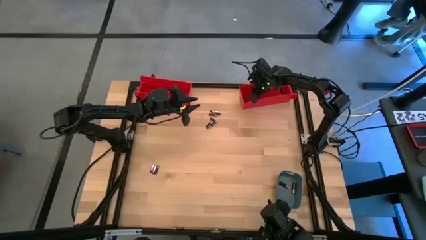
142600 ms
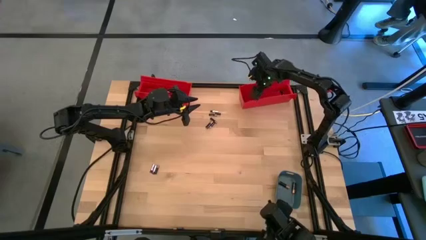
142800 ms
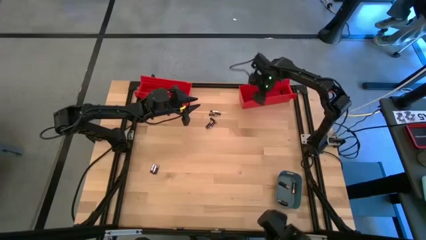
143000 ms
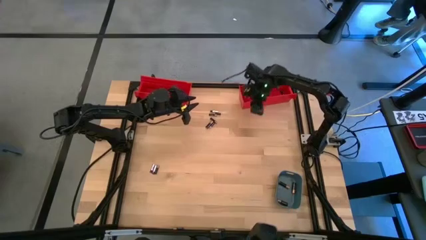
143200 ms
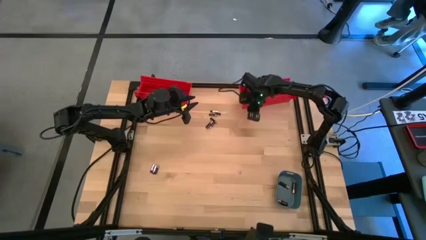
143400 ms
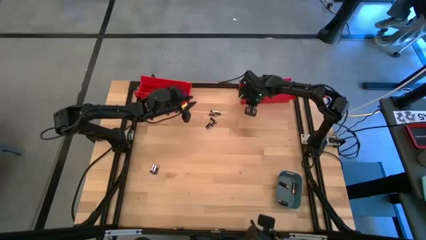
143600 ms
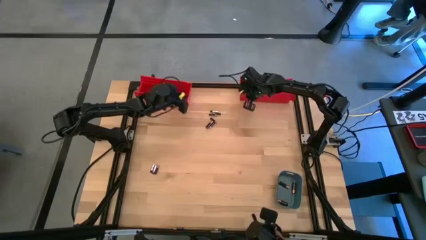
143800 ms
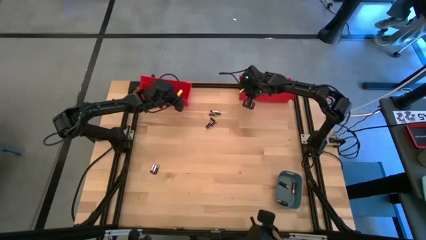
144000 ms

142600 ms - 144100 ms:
Task: Sort batteries
Adjust the right red bin

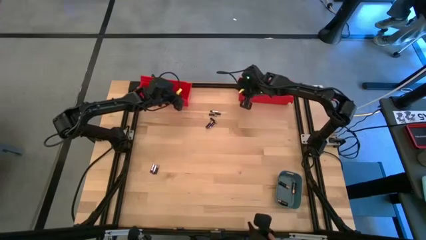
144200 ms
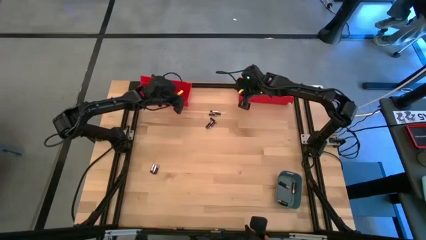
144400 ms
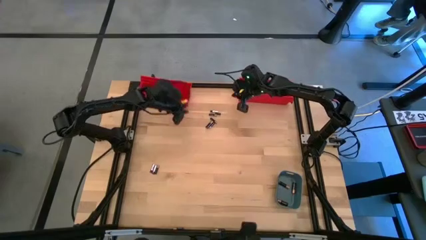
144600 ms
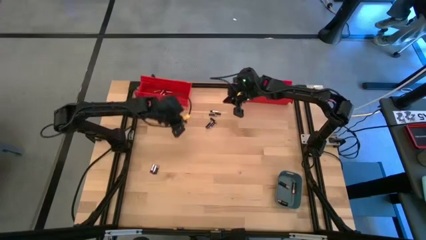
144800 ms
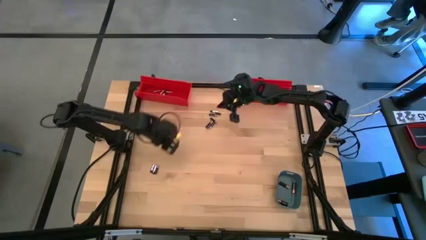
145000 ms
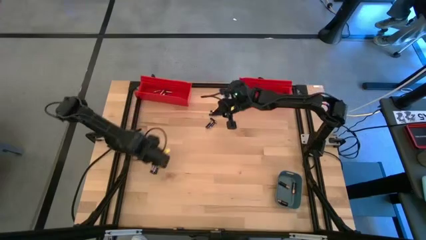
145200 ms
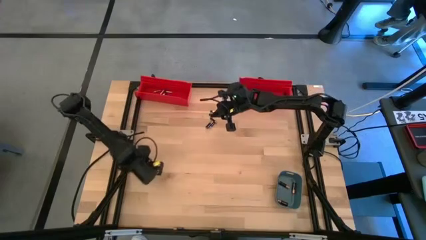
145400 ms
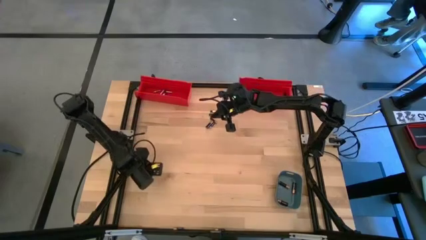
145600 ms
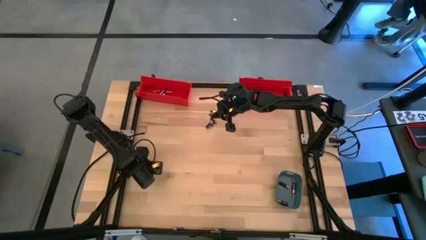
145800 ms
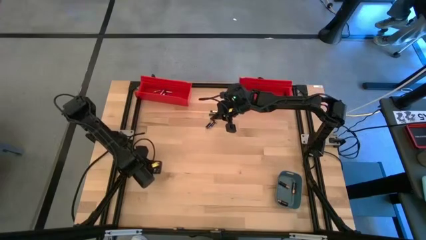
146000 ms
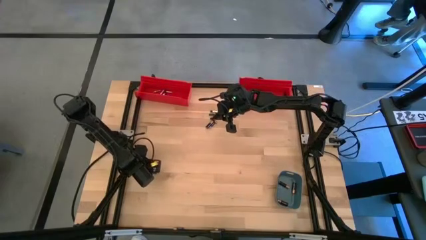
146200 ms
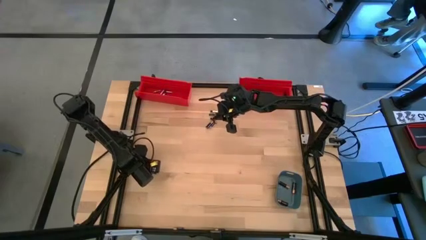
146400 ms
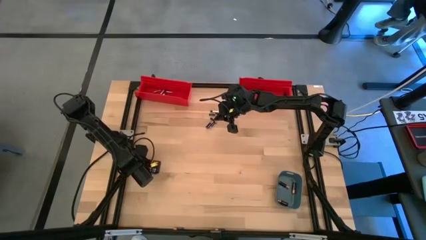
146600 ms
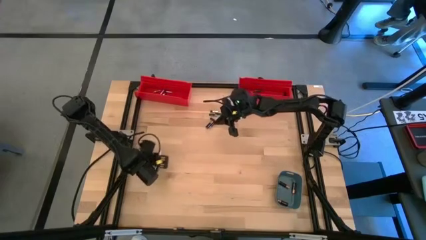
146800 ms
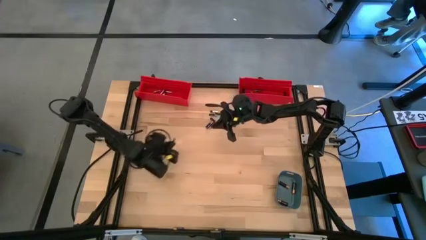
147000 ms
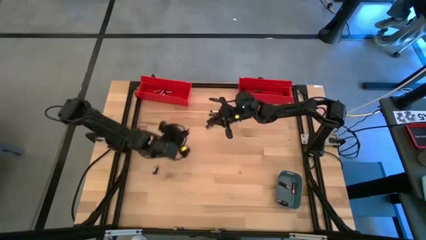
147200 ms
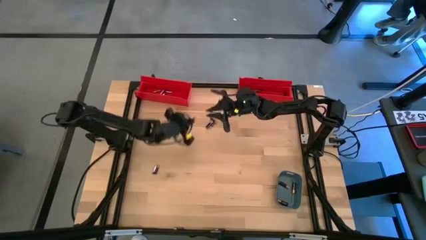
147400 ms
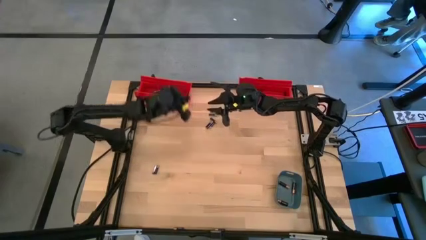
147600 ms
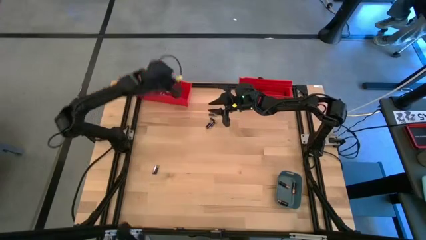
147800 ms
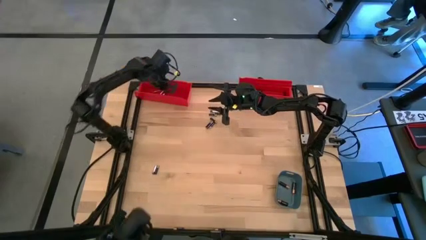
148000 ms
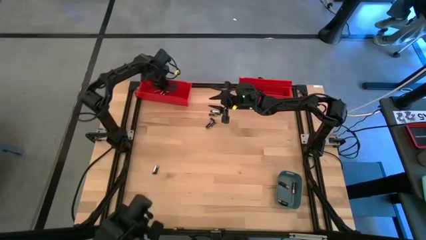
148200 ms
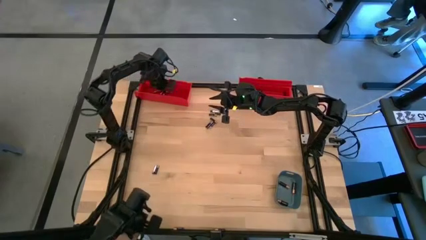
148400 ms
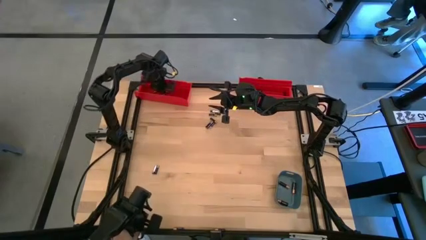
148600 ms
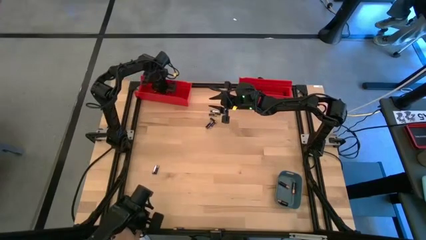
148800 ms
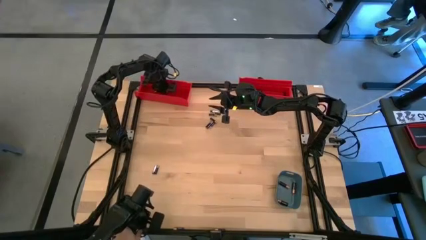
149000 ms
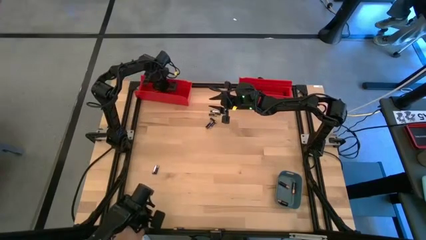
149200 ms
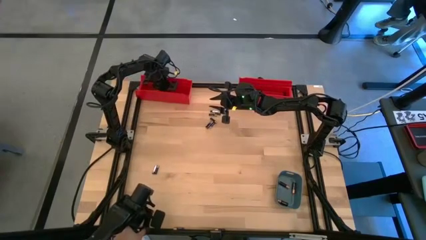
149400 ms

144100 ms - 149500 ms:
Put the small silver battery into the left red bin

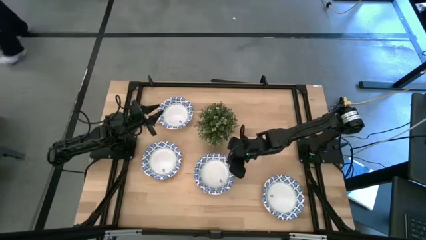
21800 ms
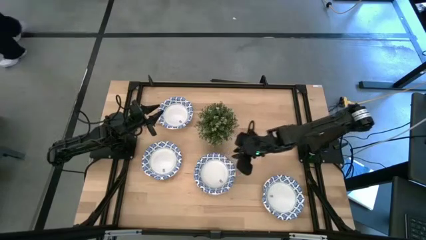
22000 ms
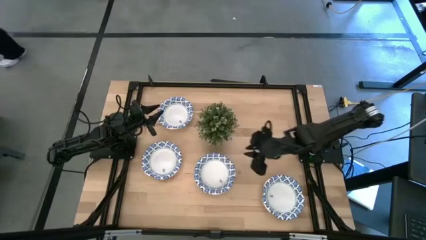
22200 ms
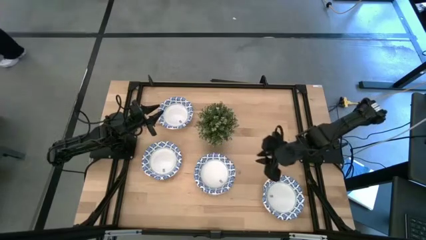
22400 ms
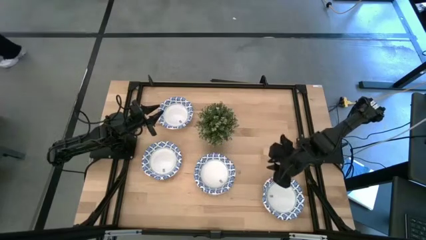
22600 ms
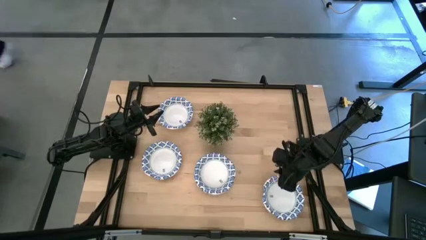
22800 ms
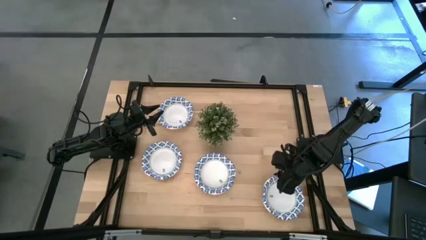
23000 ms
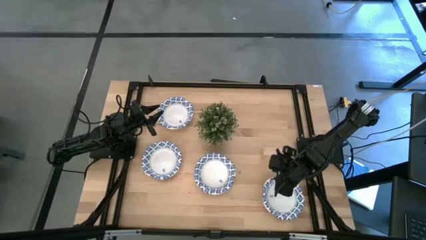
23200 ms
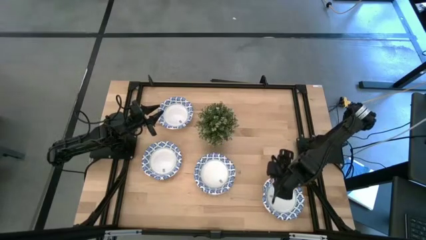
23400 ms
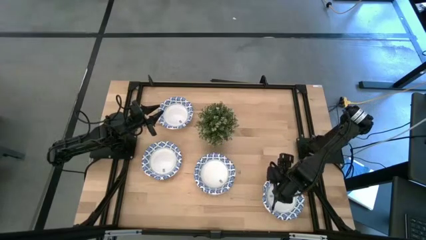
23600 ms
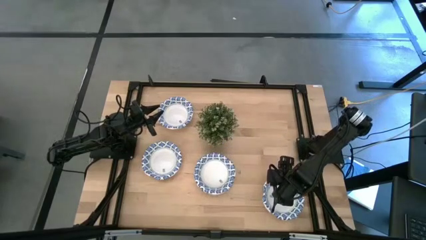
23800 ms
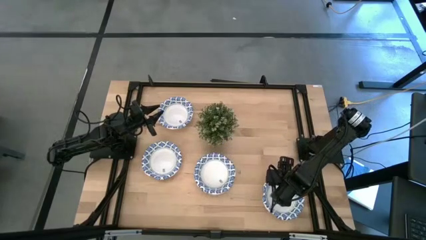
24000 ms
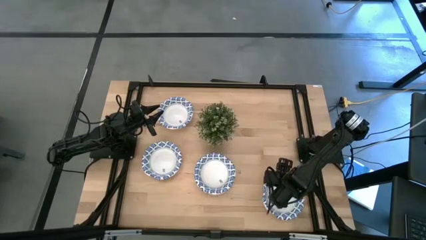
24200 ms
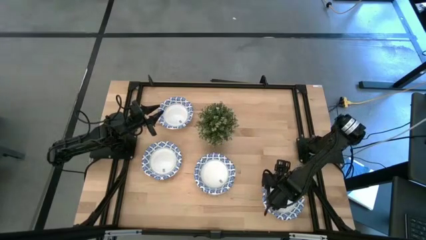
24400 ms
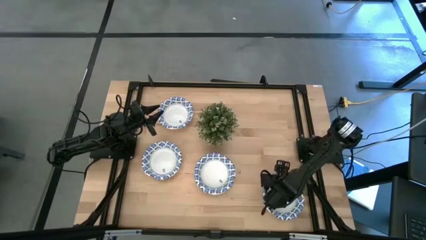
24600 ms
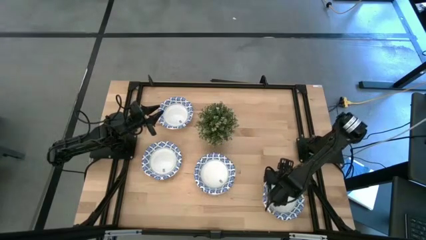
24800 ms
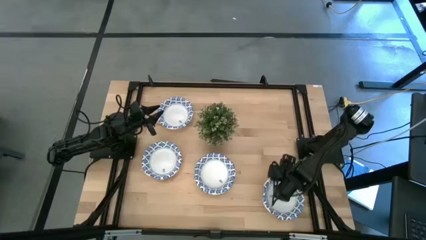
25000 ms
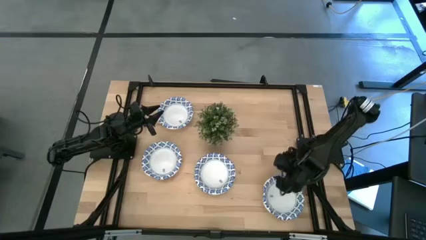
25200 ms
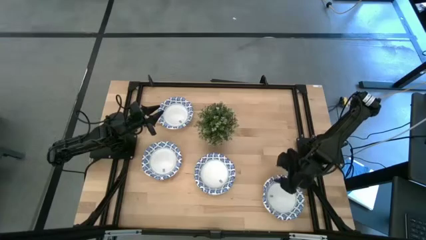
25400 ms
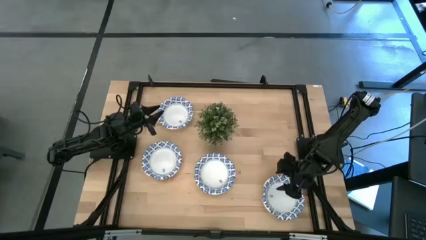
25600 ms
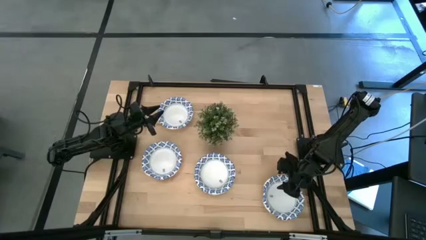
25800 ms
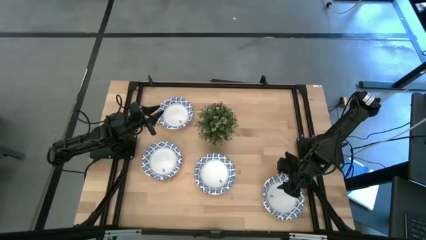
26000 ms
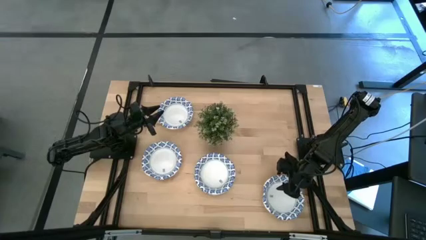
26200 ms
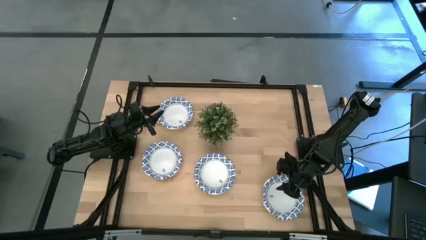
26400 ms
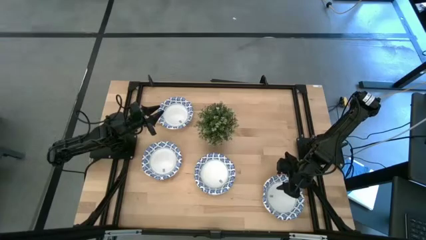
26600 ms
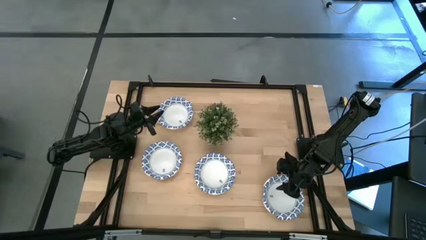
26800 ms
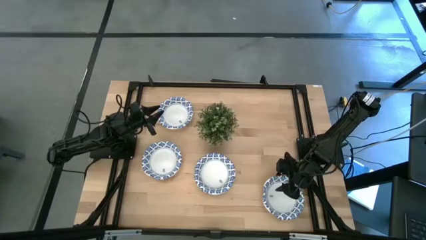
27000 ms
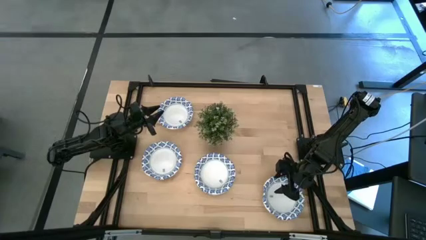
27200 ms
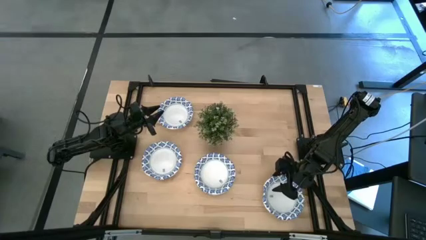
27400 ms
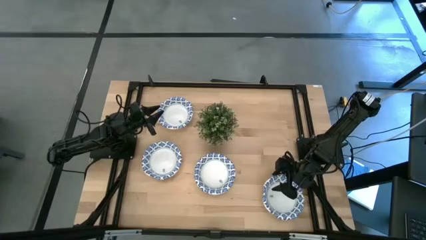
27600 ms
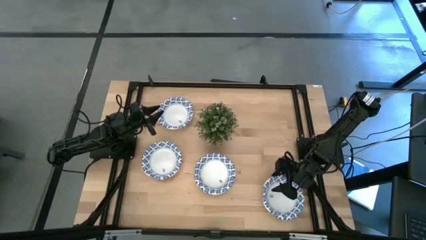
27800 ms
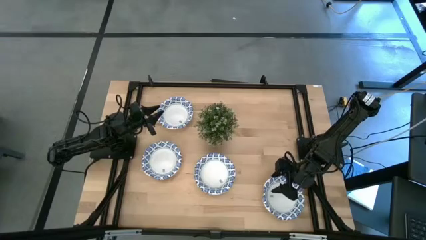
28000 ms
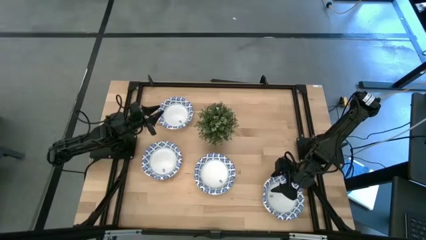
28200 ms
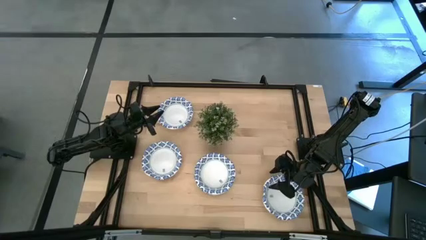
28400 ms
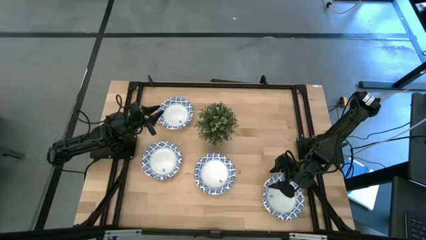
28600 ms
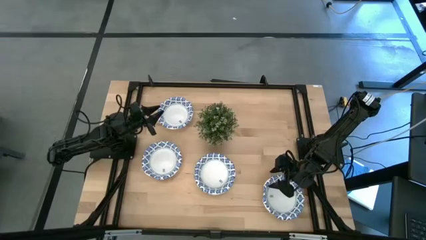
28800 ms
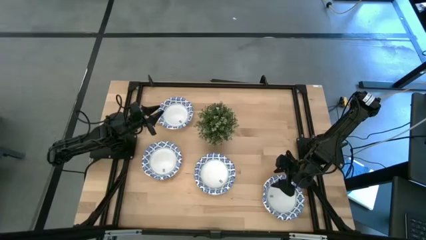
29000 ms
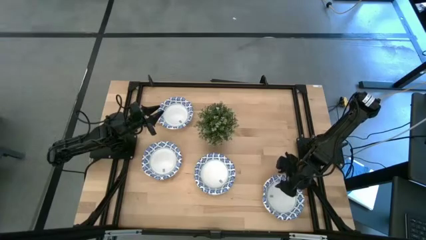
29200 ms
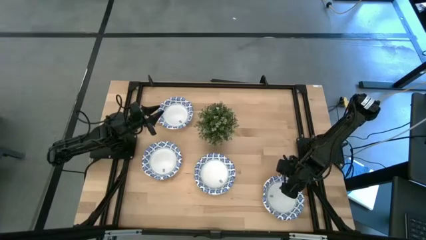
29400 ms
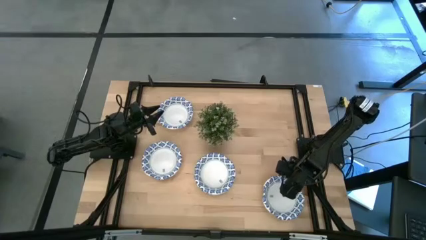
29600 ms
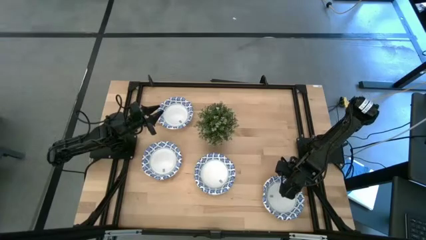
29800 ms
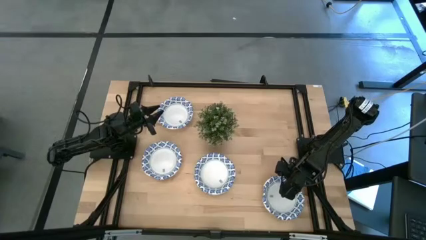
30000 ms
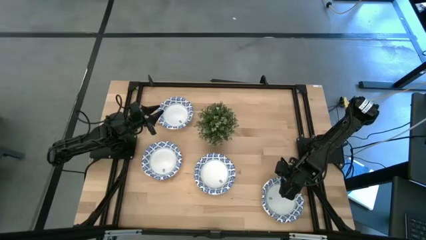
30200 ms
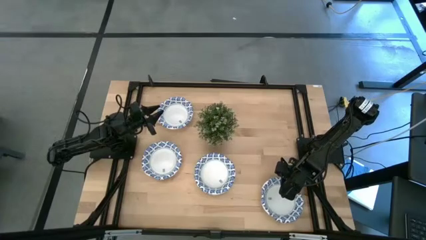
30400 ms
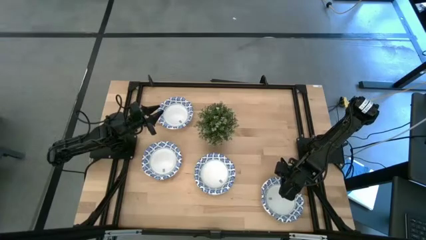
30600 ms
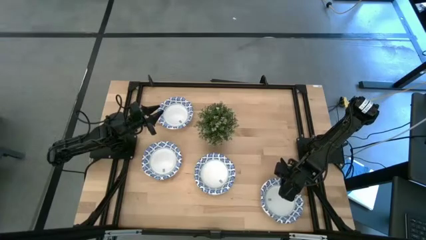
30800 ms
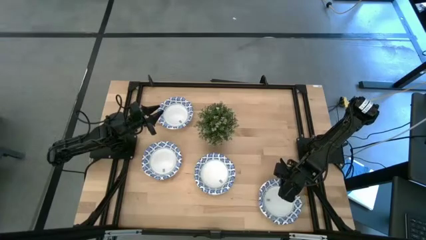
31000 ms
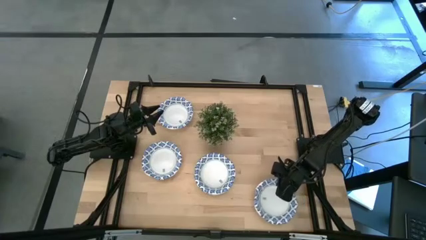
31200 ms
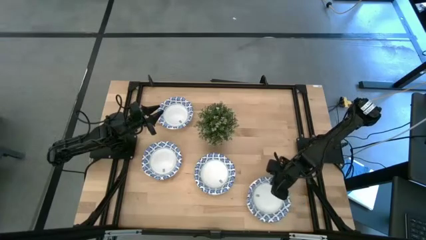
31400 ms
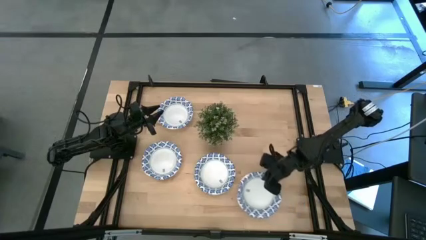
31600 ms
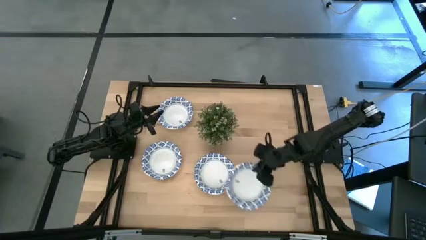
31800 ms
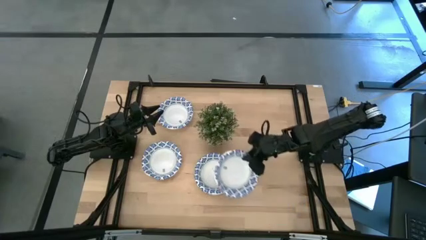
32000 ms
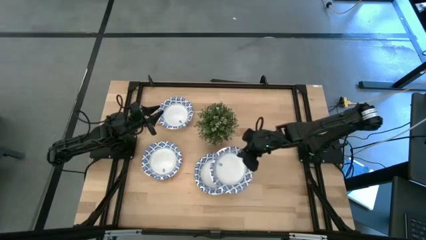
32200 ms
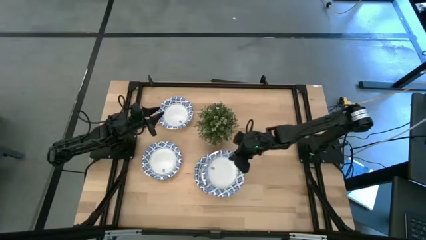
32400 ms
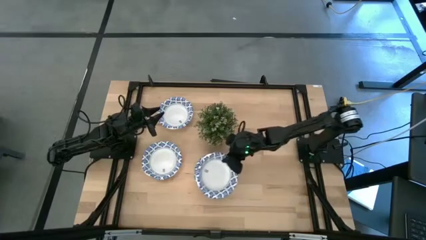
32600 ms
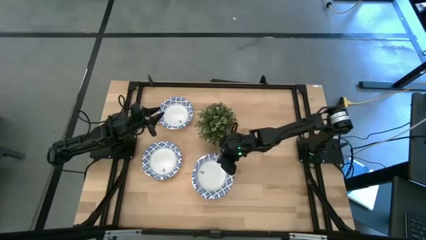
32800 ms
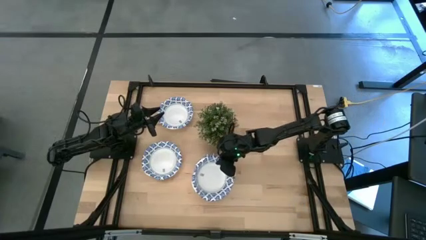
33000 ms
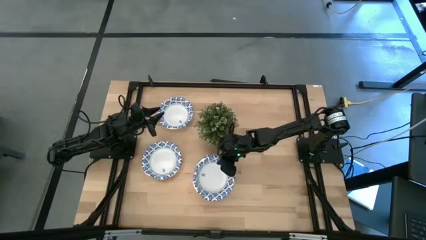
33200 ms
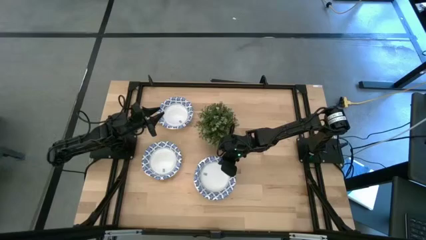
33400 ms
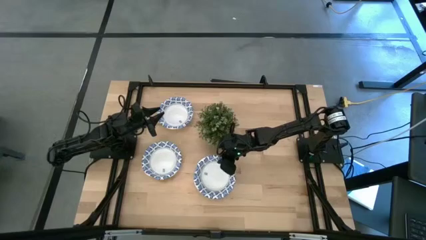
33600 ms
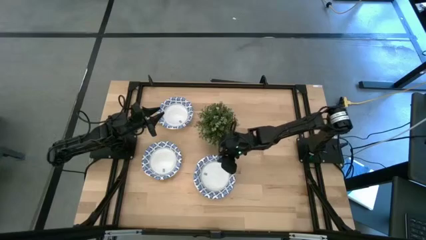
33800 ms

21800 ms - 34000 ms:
Task: Nest bowls inside each other
Stack the white bowl on top of the other white bowl
